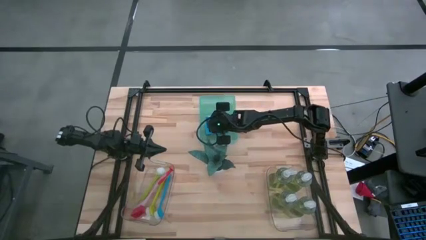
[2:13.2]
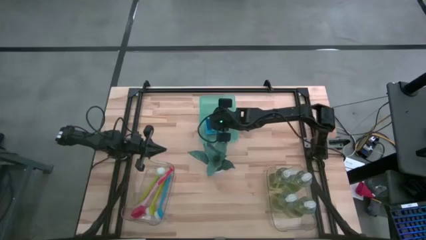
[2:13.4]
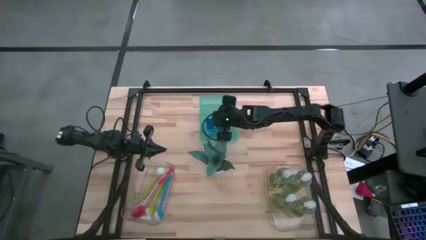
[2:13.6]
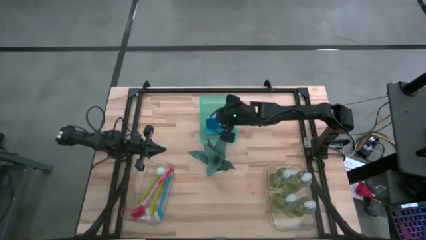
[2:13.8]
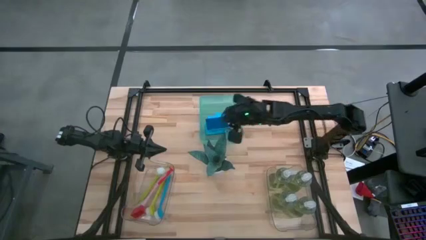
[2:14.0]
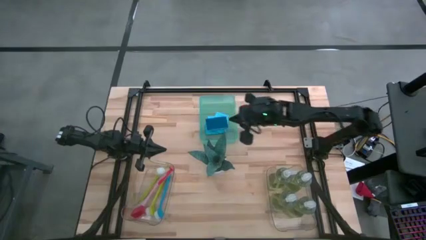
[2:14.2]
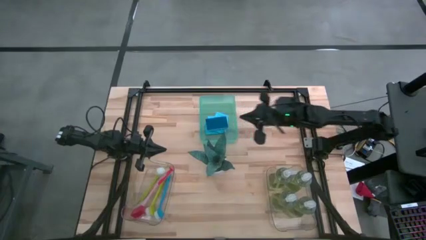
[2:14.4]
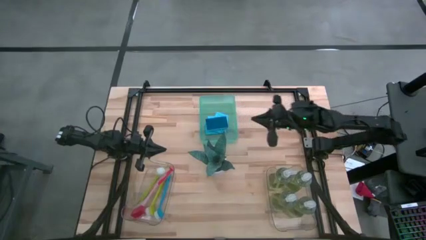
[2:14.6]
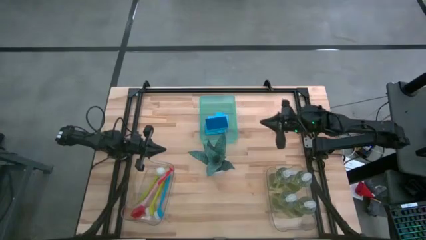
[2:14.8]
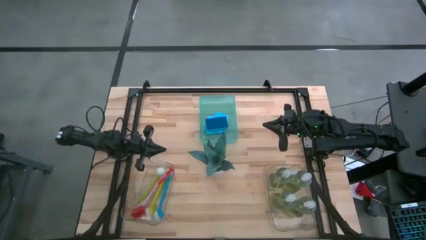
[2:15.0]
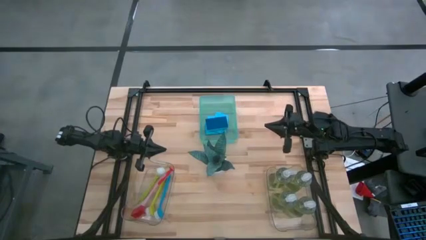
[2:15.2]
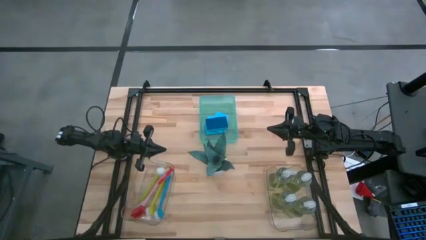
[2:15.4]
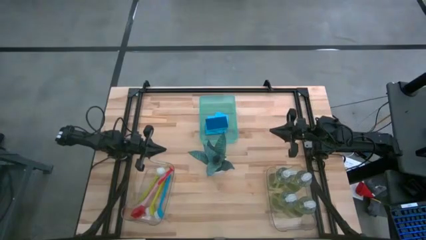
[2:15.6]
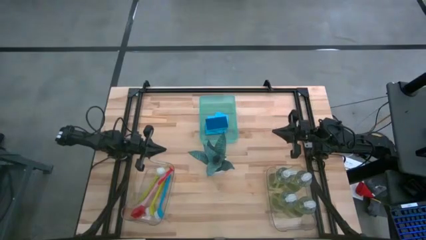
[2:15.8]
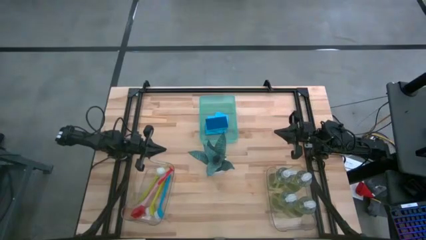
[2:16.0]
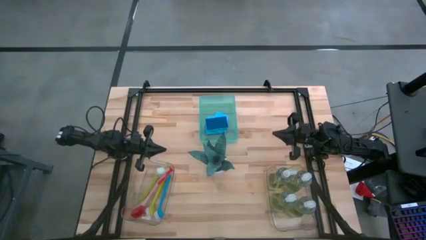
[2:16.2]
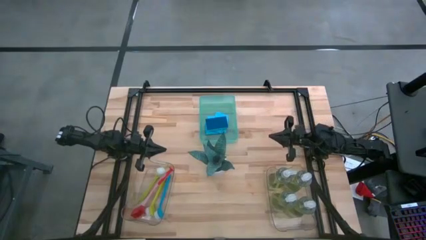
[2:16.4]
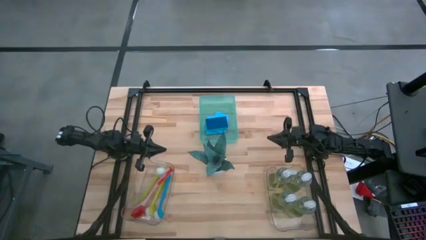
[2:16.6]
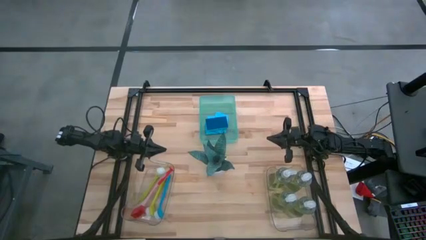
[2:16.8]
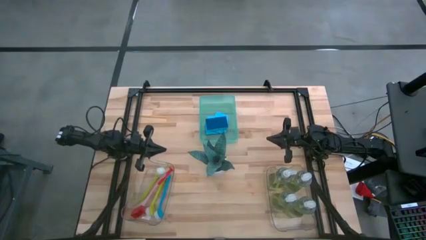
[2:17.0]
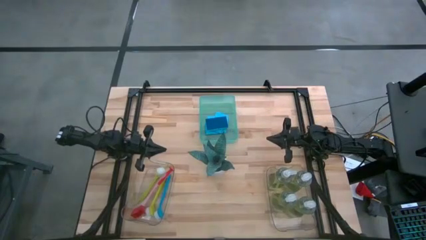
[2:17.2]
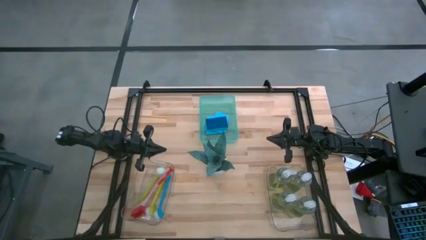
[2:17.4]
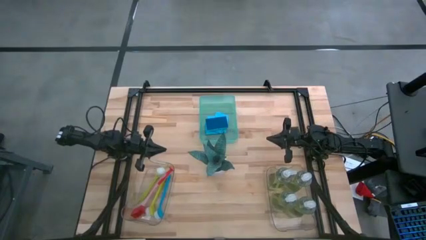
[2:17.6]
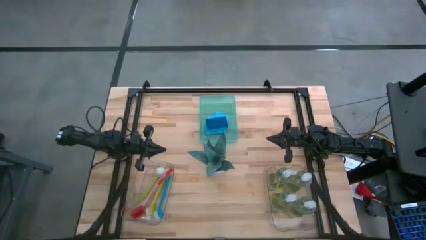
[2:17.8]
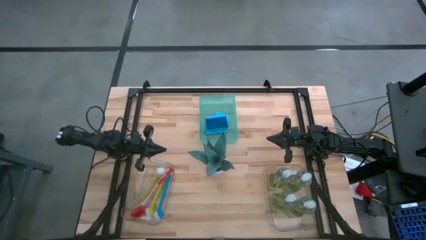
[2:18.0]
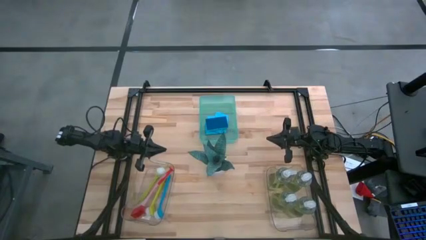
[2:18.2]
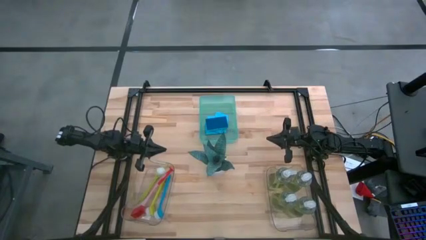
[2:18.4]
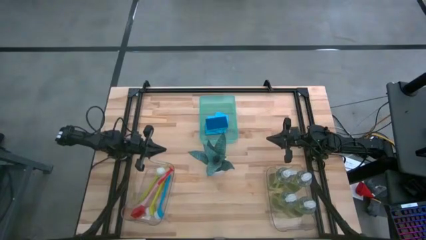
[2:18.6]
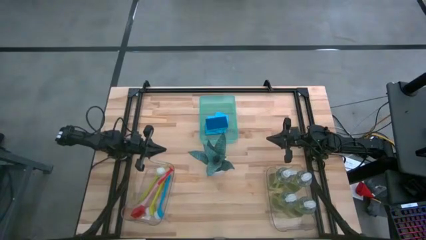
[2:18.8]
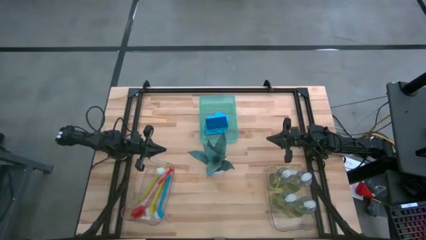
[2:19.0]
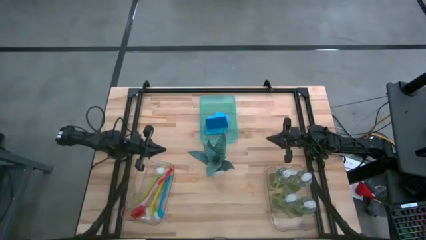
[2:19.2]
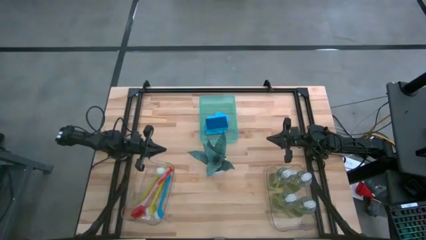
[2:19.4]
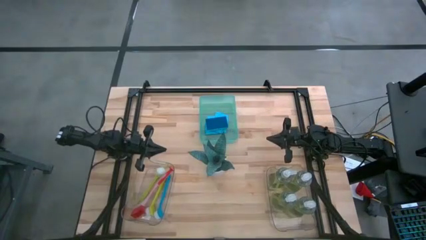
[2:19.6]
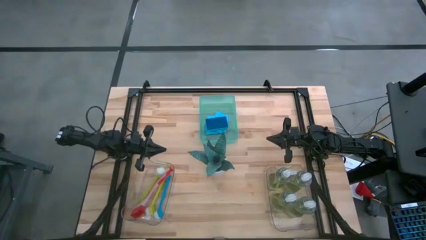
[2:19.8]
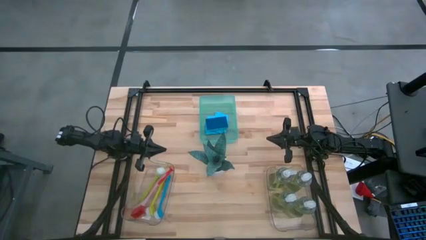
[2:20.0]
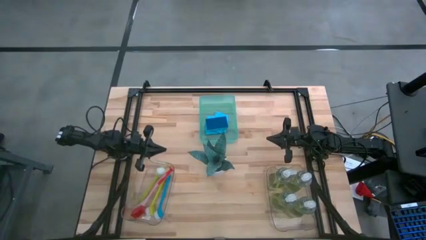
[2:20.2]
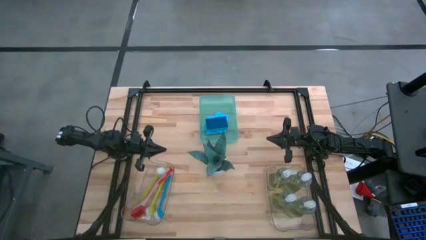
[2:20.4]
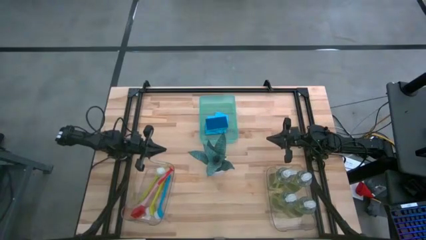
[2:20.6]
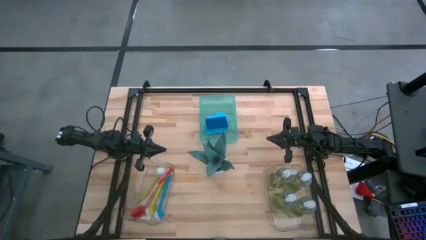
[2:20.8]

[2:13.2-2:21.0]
Task: Pick & Place Kitchen Sink Supplies
Return to Home Position

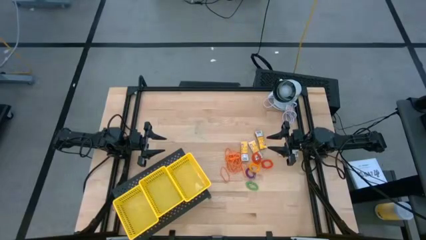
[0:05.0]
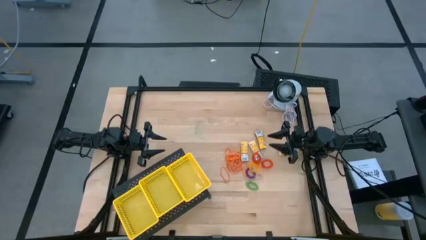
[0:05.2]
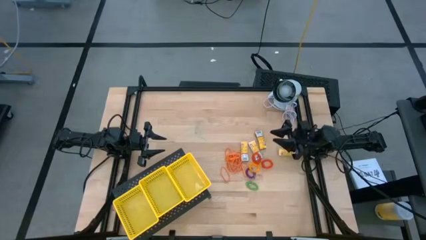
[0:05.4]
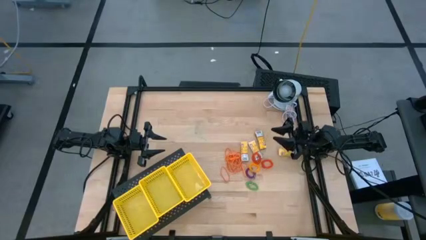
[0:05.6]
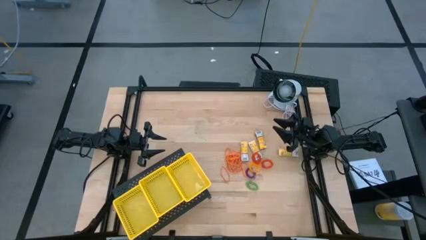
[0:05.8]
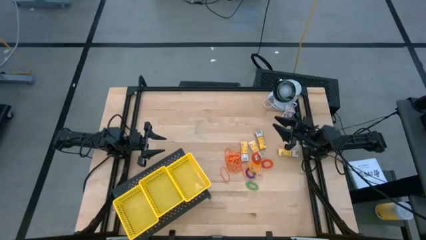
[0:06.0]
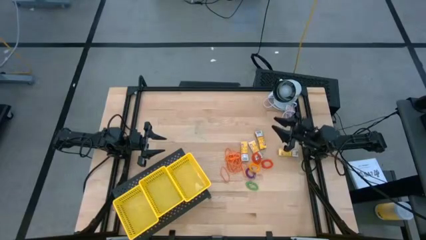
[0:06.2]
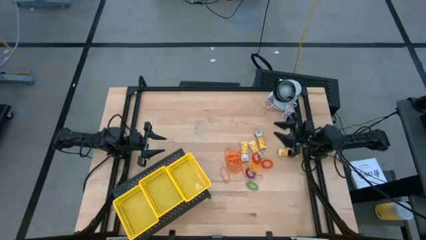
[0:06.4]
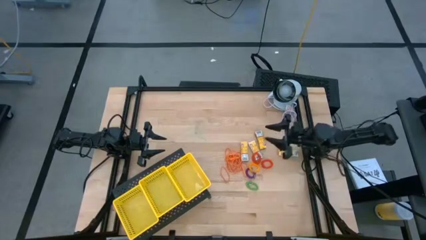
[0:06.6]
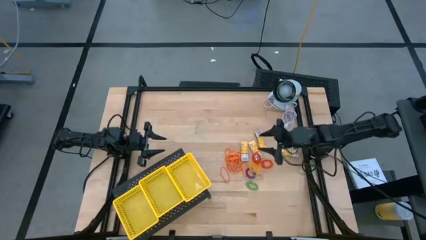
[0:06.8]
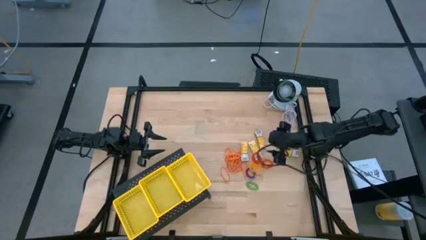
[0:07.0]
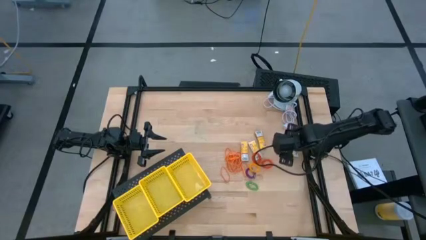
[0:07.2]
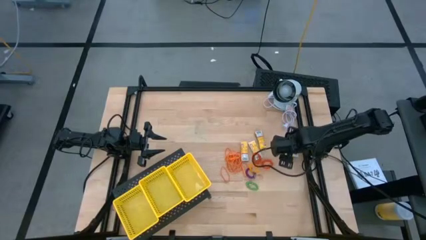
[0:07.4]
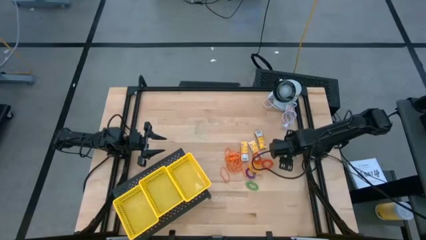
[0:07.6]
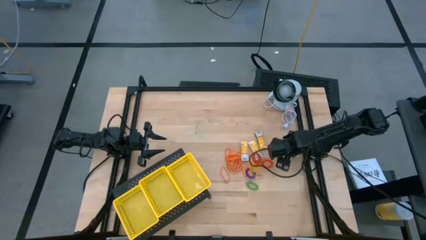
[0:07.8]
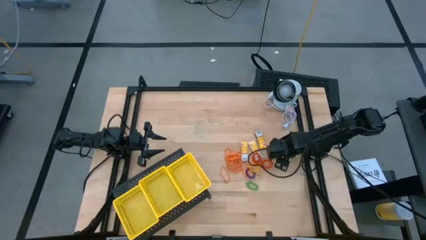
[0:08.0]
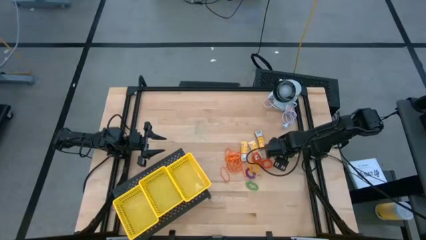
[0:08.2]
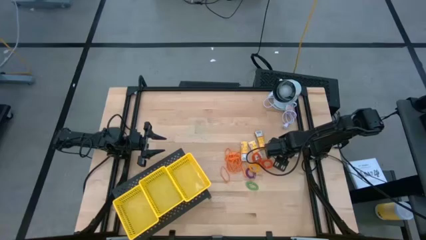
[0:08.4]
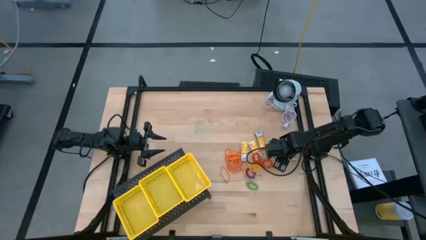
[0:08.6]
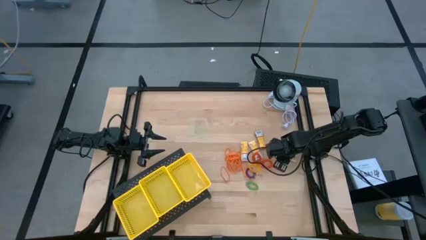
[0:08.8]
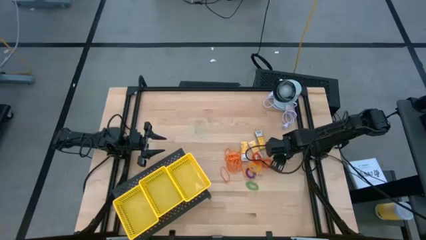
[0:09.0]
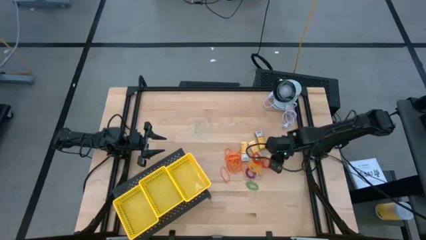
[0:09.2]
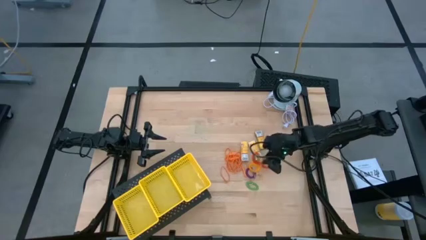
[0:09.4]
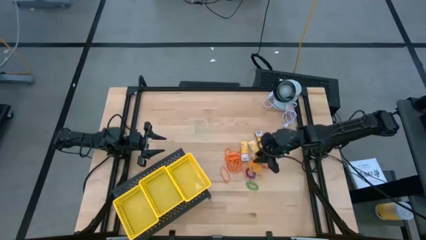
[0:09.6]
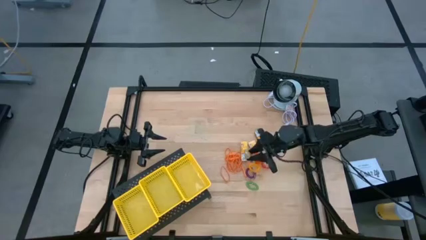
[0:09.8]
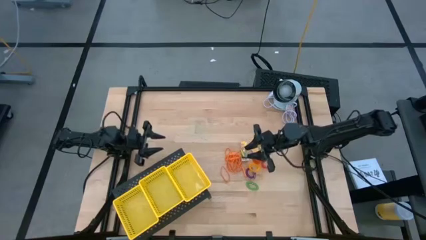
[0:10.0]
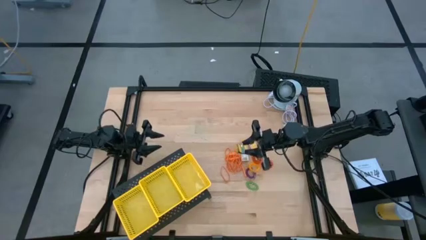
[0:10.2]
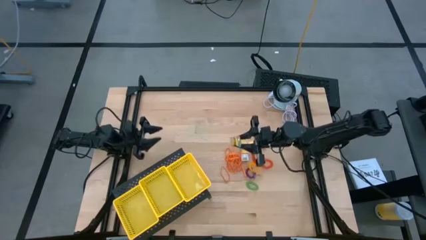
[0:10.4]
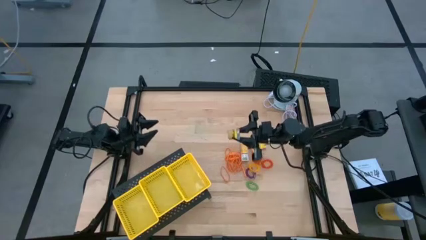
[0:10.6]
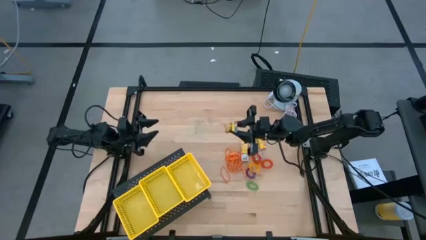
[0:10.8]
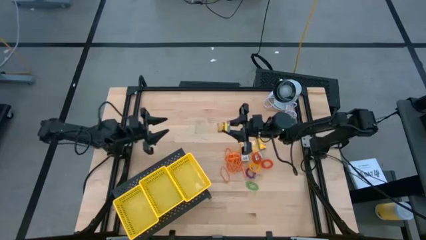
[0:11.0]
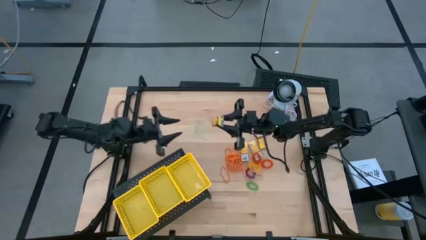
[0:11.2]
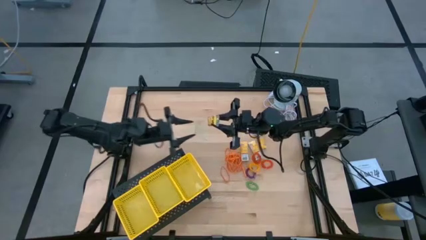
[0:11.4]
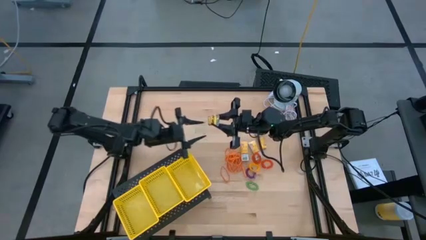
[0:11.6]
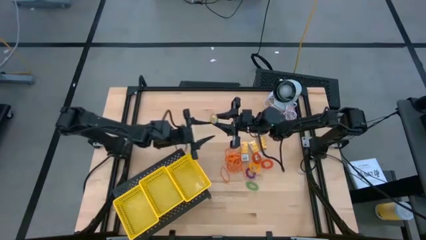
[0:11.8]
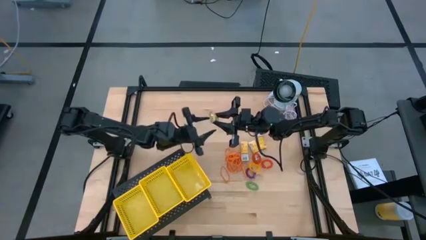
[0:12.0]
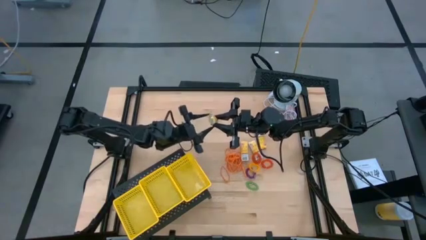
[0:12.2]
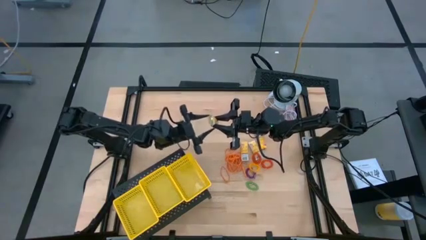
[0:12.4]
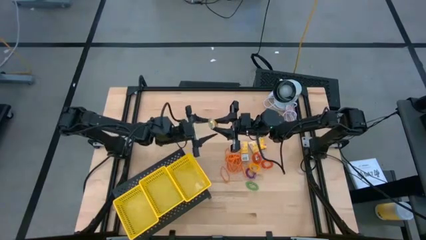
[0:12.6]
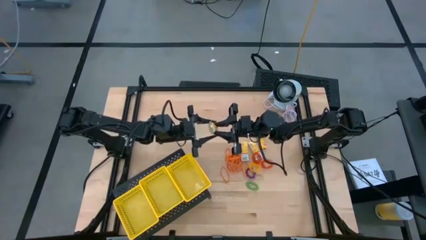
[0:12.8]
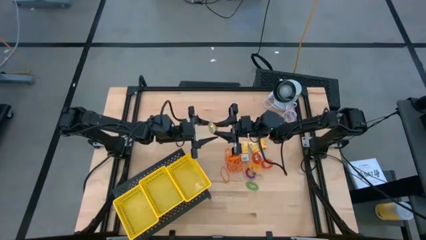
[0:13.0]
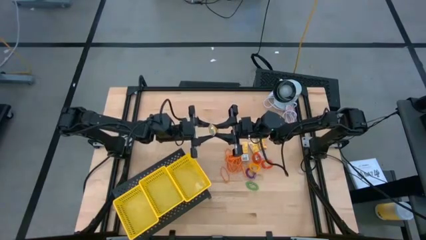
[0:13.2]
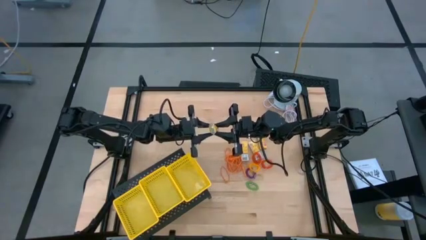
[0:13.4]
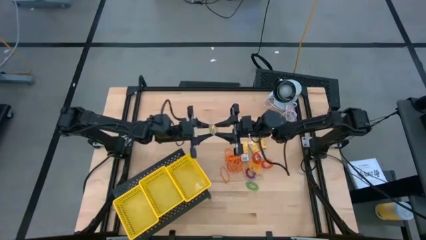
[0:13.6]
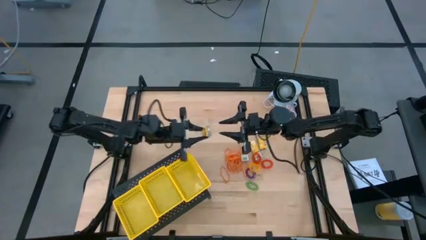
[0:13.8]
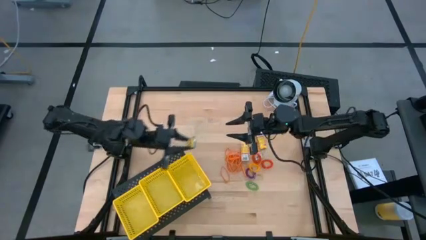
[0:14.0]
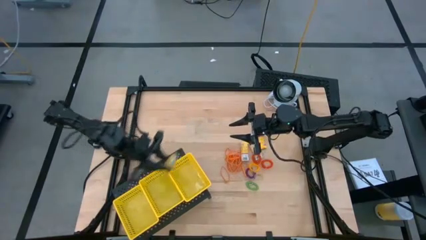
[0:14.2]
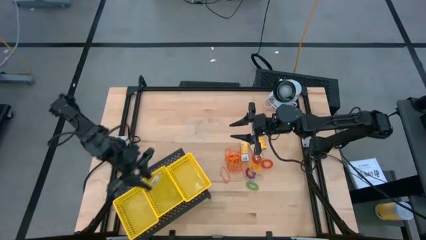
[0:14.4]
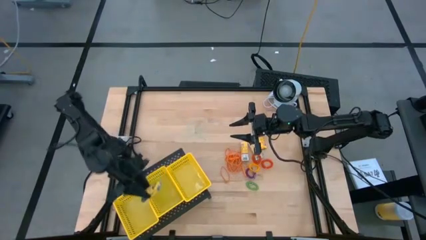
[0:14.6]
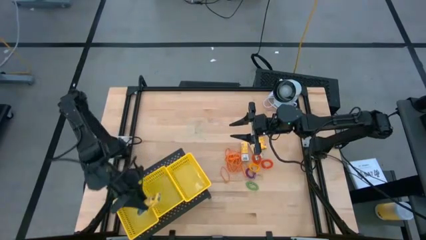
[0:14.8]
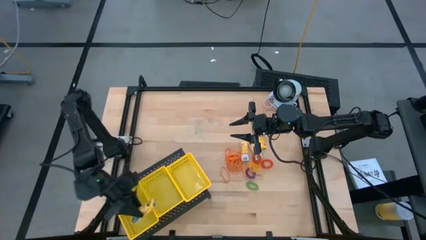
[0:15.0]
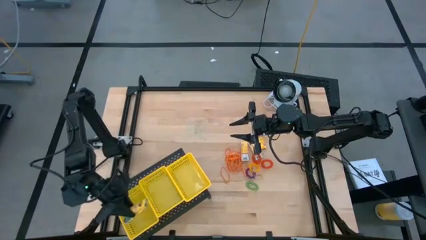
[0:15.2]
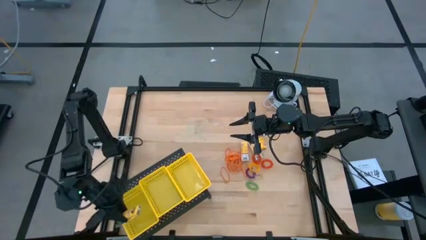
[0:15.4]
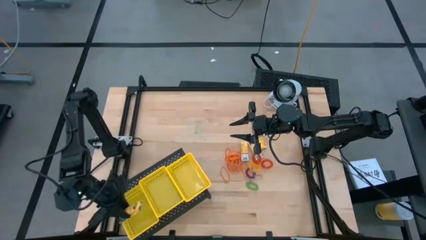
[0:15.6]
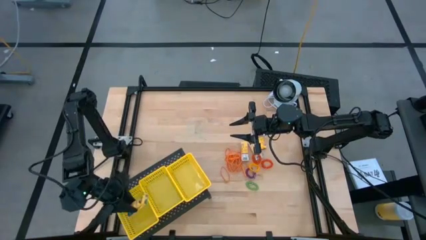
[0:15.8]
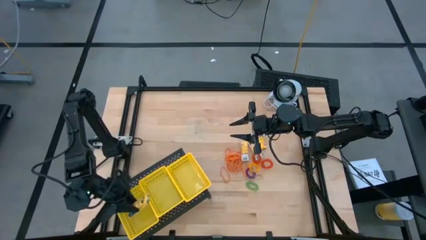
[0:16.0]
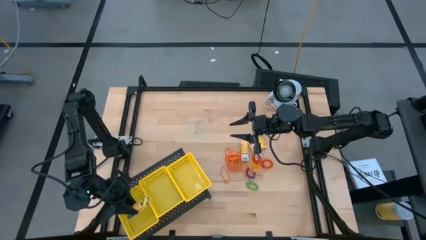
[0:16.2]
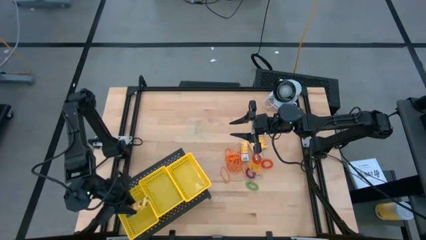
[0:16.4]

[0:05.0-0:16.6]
Task: Pick & Place Office Desk Supplies
Put the crayon box into the left yellow bin on the shelf
